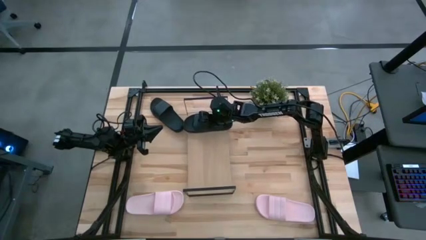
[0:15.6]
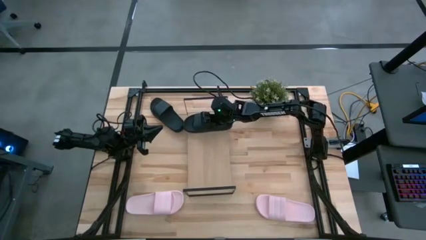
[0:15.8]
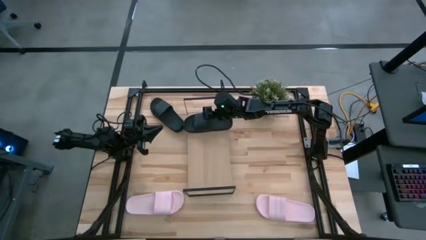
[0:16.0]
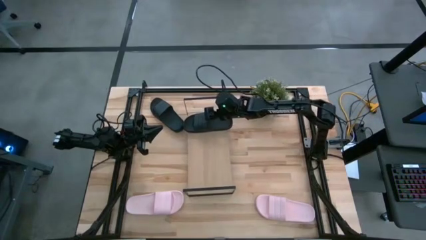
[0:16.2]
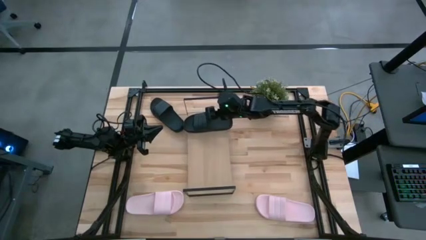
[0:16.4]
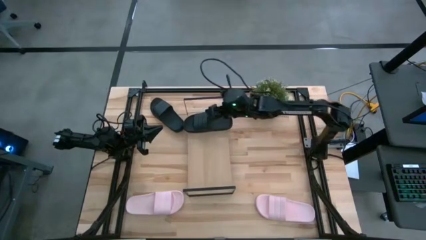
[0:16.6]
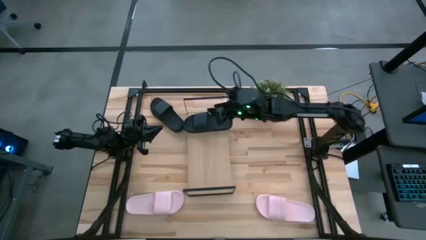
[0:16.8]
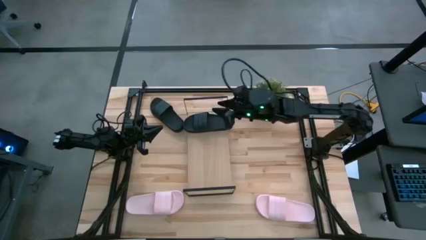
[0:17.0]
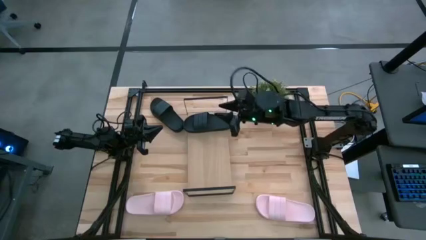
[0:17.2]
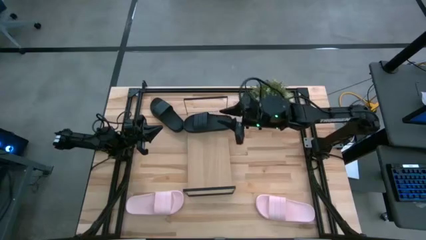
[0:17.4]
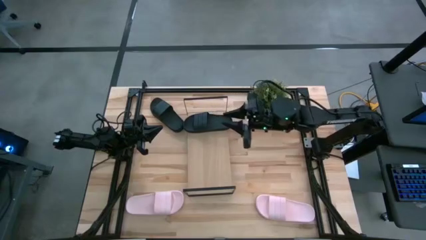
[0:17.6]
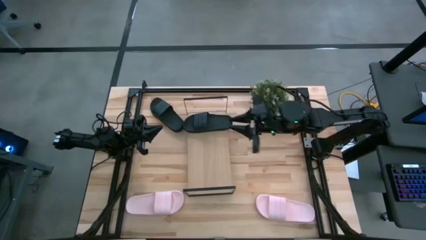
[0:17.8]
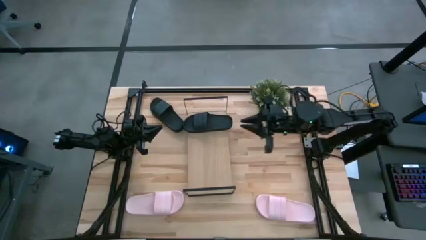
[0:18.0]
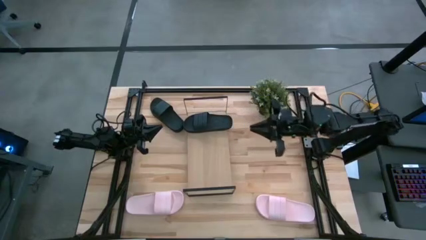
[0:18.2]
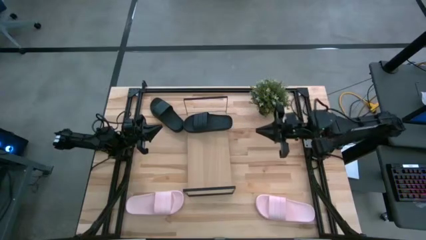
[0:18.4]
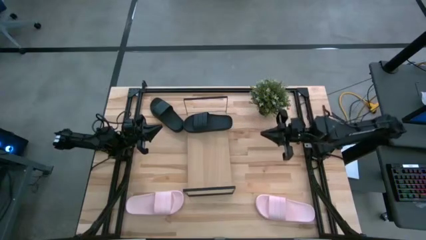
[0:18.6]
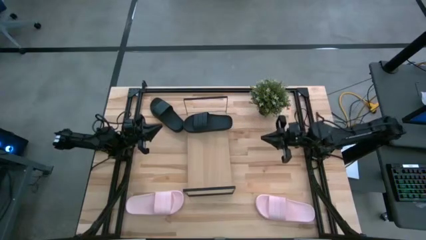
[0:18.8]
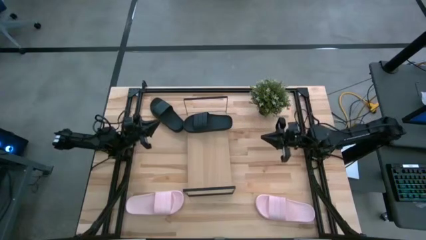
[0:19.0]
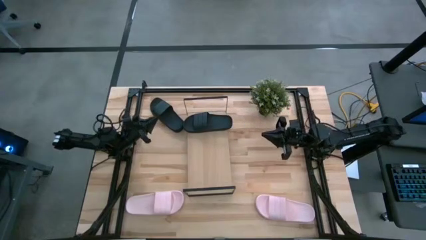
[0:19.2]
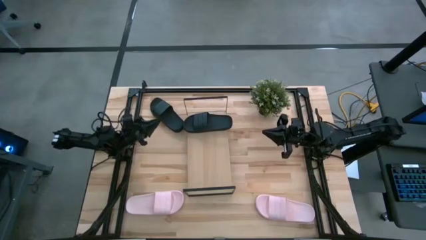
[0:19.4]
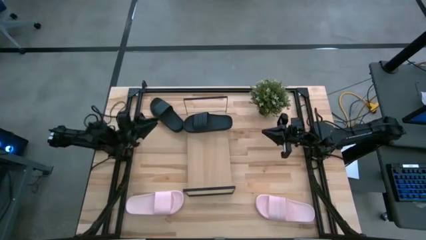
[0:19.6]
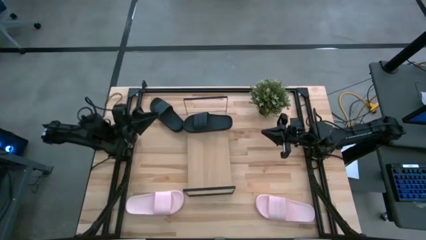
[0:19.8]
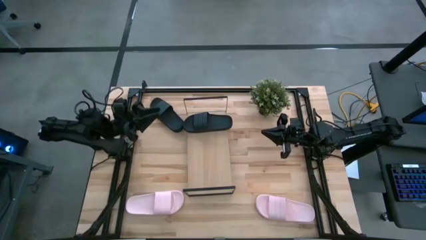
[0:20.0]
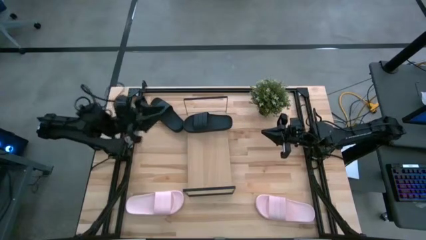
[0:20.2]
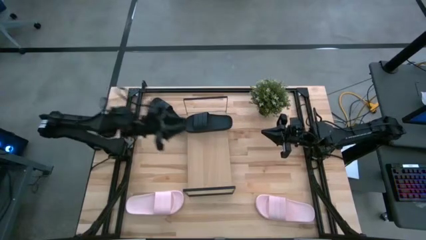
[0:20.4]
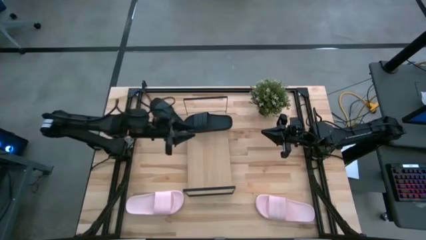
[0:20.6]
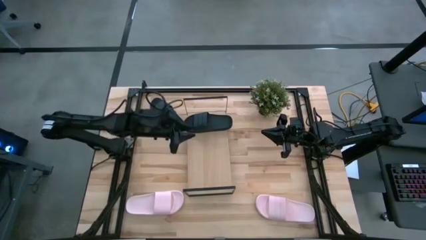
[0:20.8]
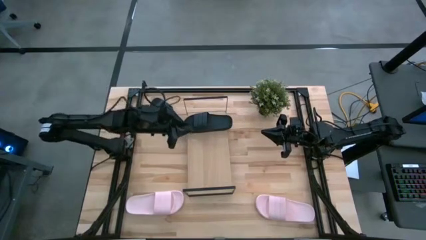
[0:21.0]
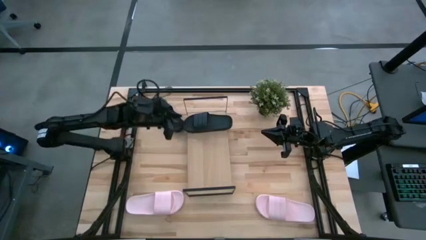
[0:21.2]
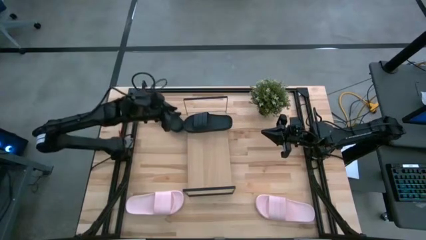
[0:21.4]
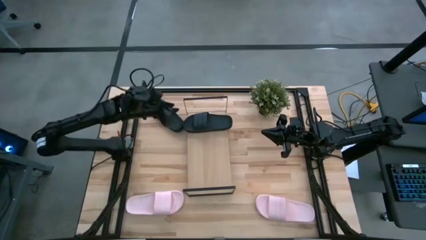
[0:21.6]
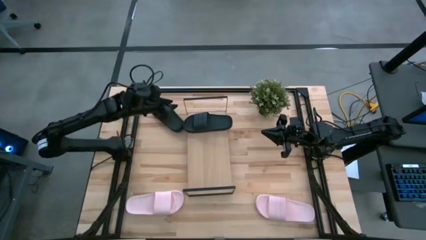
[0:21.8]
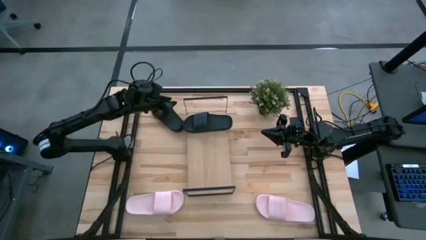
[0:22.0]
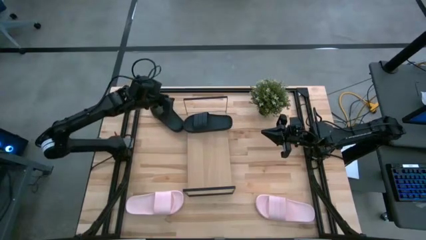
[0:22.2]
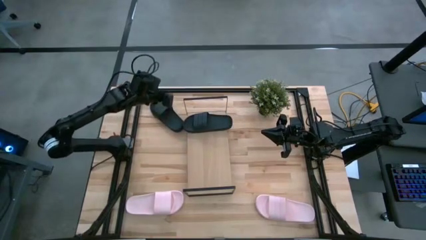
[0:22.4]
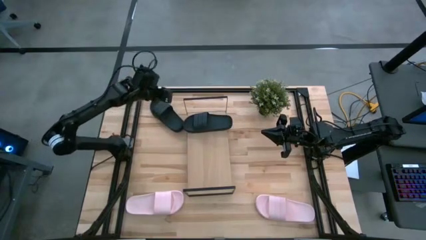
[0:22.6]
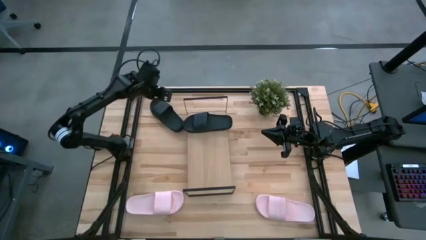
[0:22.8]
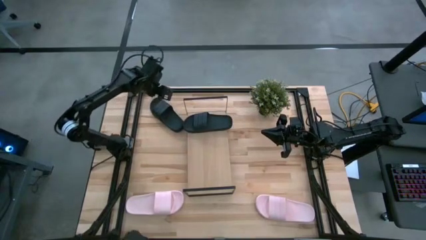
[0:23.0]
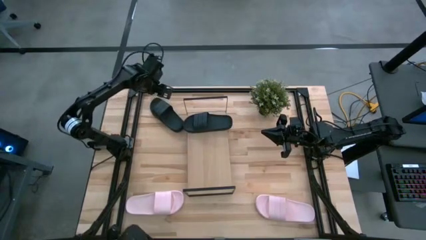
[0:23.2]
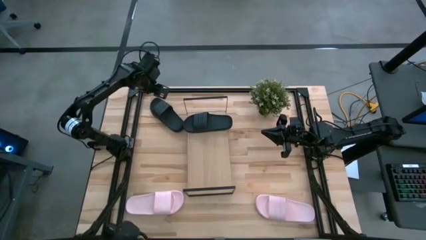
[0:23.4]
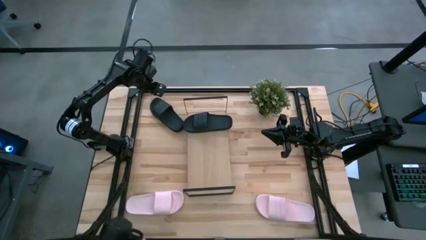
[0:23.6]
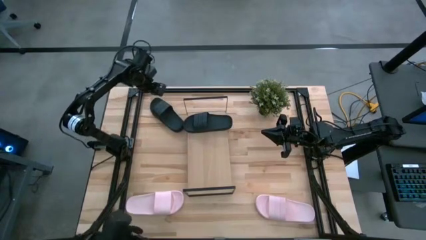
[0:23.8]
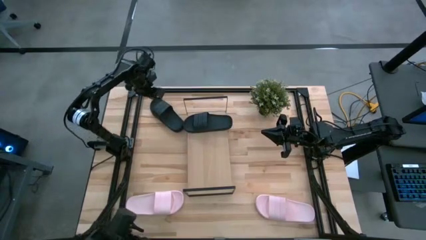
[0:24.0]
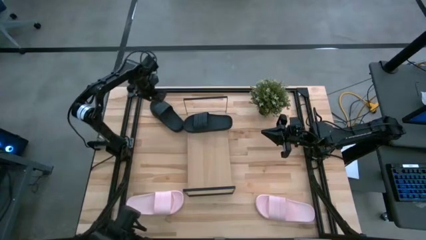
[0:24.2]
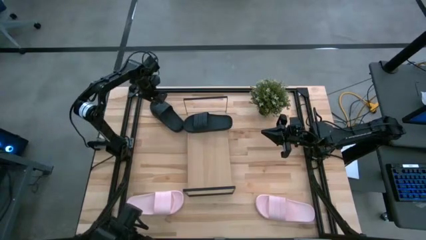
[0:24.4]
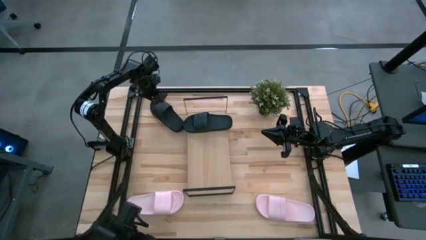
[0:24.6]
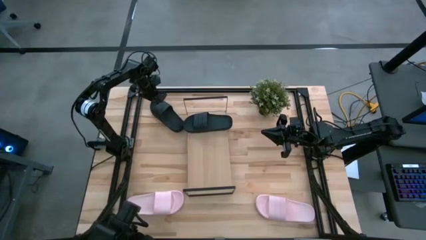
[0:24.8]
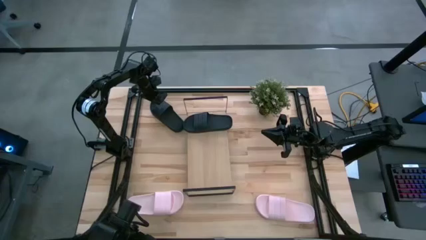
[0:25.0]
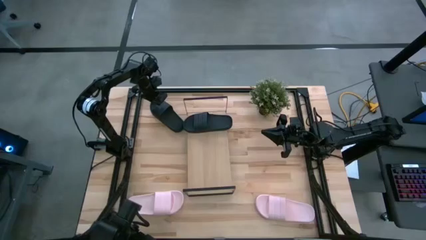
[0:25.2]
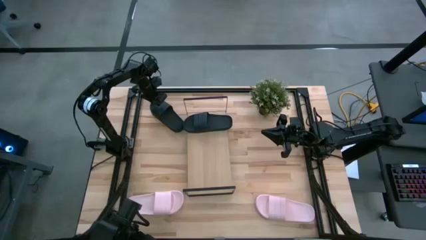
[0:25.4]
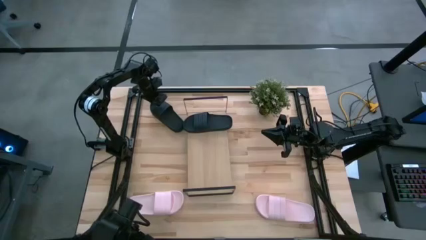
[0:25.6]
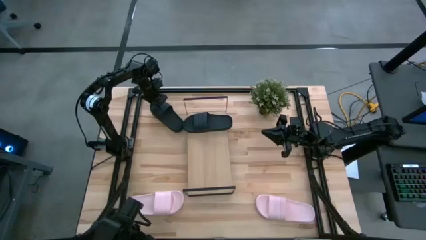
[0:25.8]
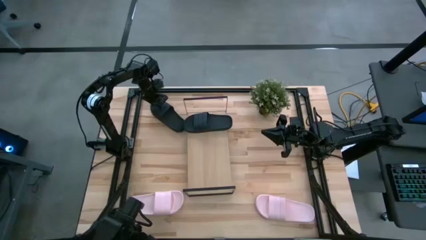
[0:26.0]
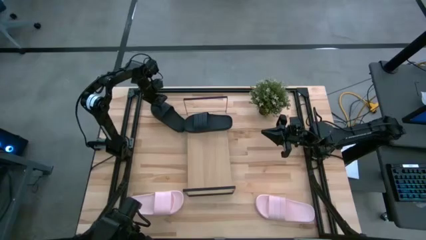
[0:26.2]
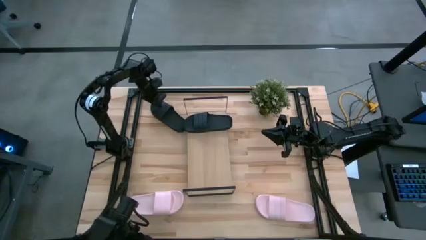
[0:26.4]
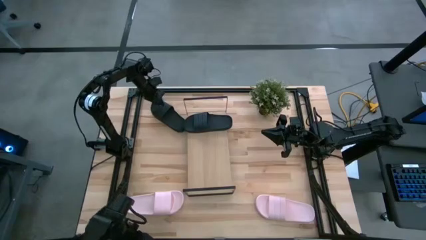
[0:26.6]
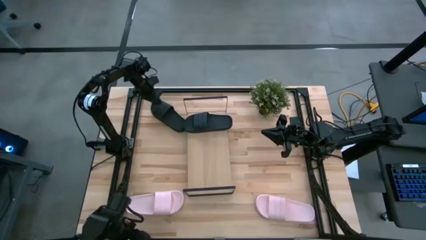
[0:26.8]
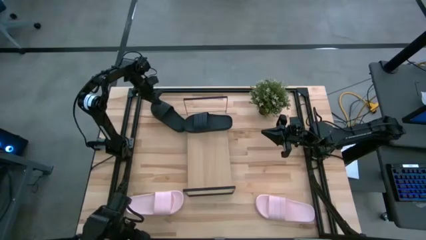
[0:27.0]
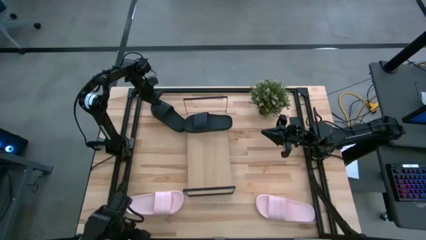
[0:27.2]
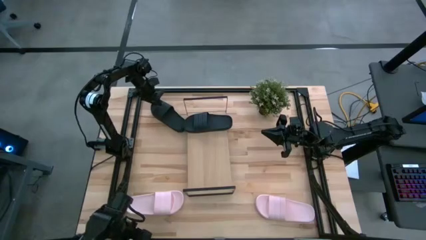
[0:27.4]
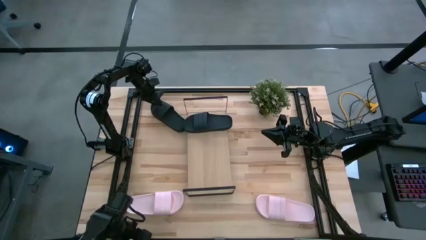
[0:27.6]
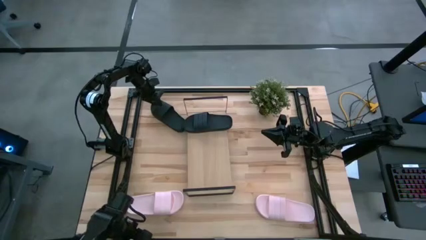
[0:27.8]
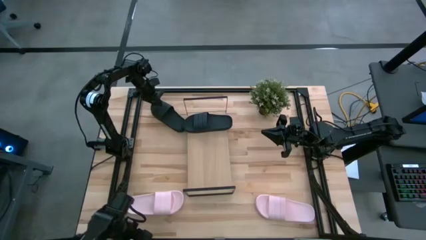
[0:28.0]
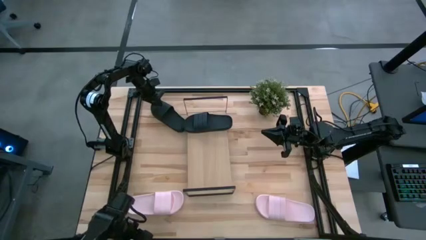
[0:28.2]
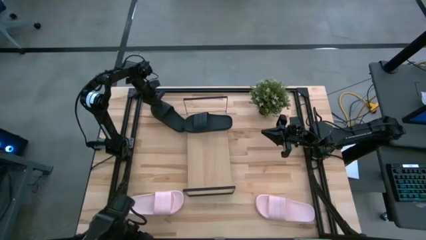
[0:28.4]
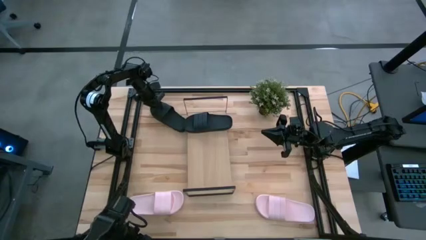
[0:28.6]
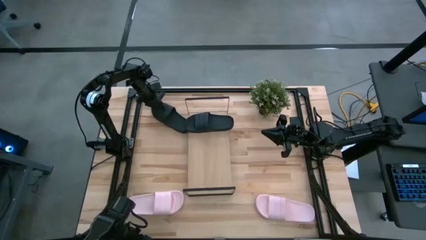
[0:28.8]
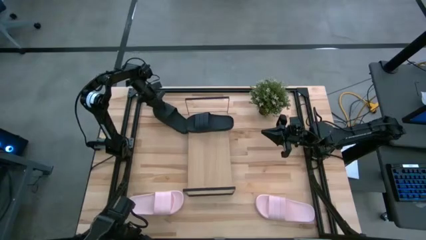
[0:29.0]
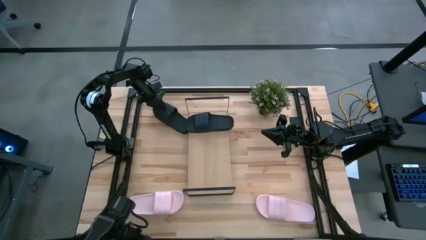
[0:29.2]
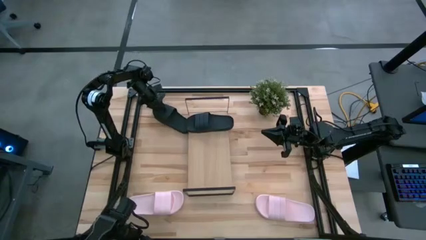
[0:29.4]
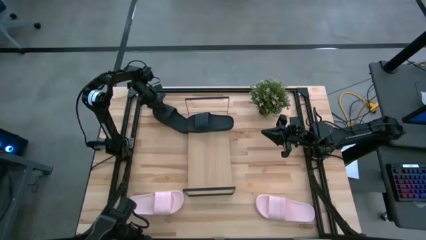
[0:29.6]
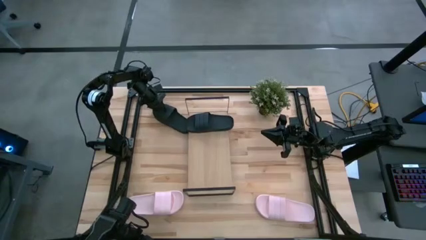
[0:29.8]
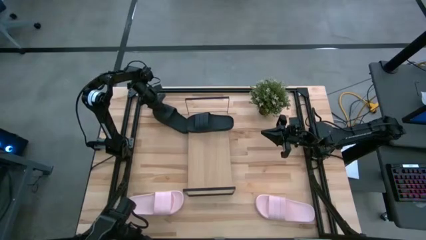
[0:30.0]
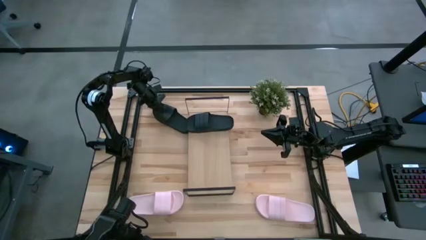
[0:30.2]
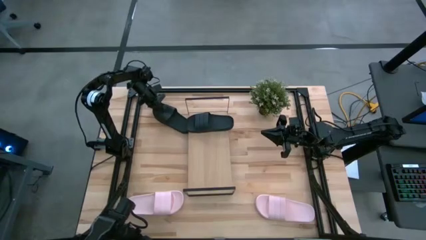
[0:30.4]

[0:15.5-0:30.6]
Task: Pick and place slides into the shelf
Put the black slide on the shelf
